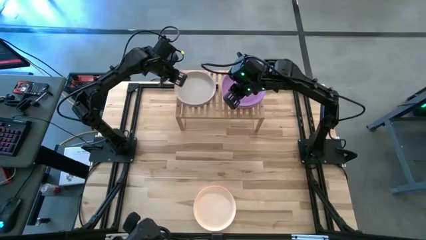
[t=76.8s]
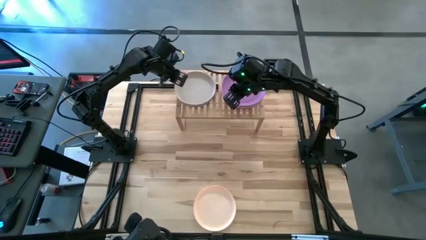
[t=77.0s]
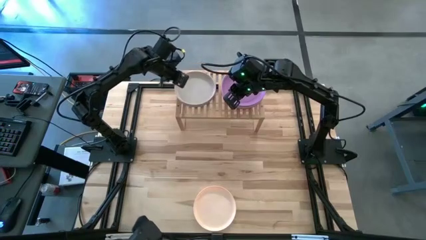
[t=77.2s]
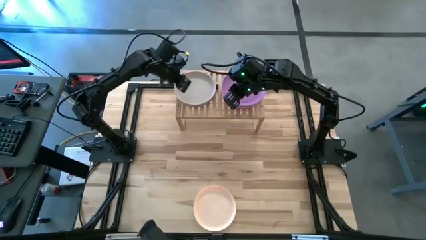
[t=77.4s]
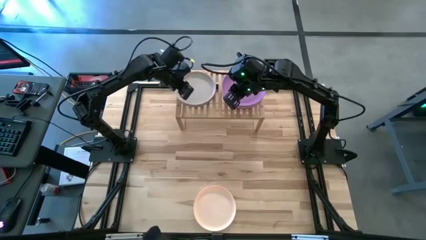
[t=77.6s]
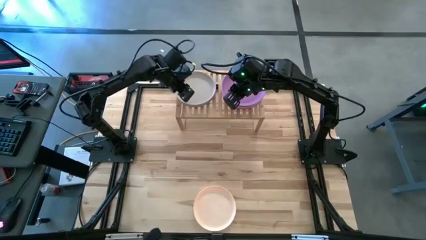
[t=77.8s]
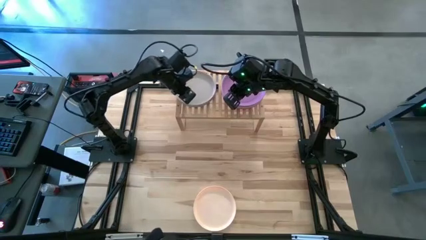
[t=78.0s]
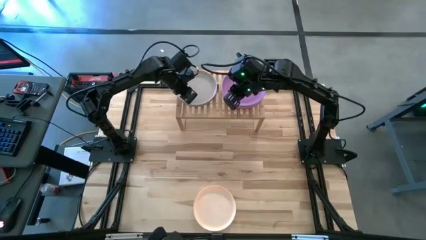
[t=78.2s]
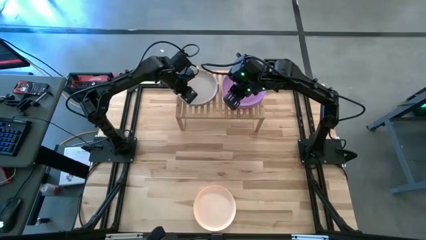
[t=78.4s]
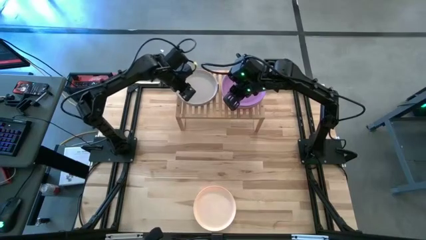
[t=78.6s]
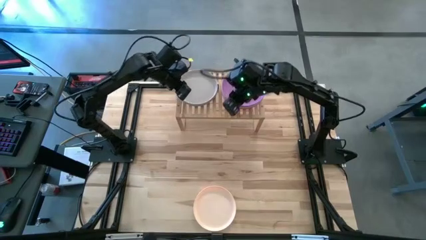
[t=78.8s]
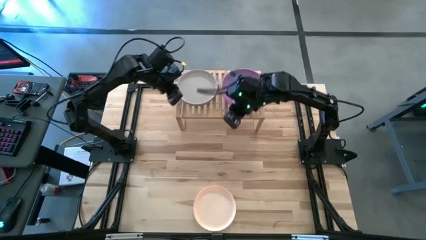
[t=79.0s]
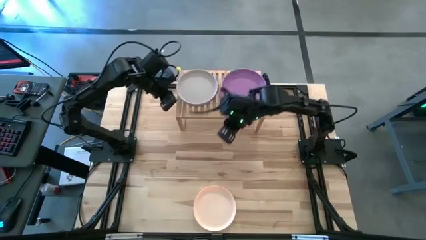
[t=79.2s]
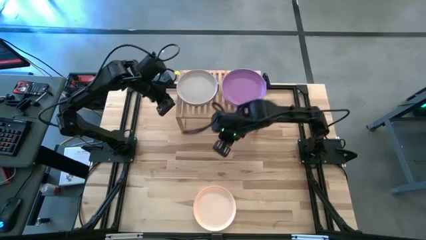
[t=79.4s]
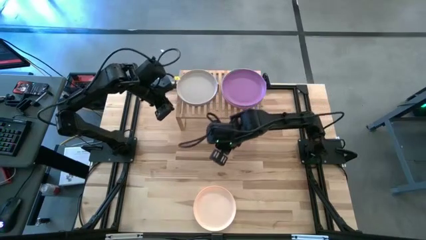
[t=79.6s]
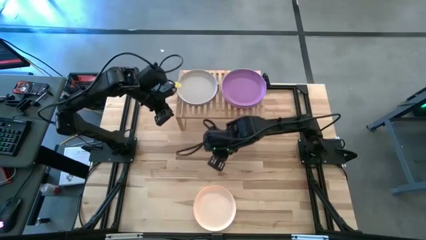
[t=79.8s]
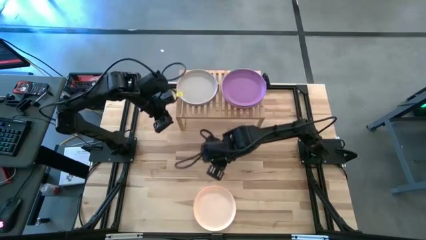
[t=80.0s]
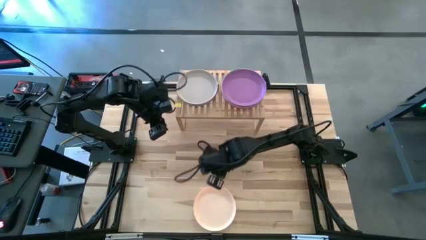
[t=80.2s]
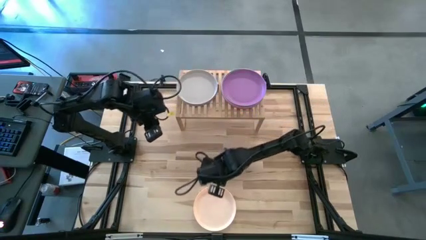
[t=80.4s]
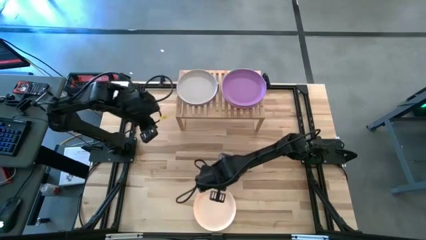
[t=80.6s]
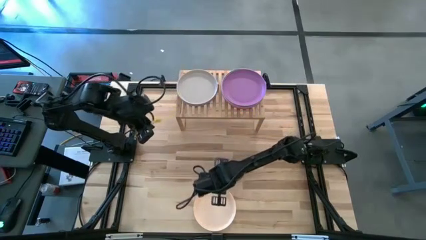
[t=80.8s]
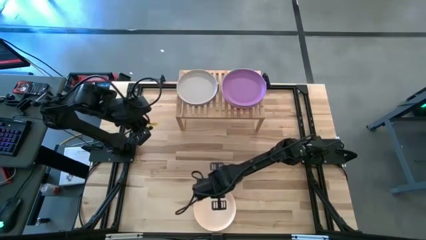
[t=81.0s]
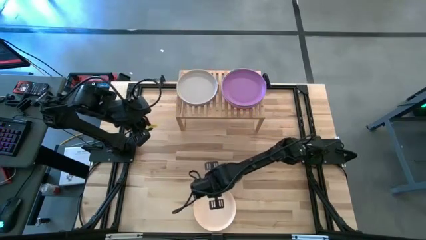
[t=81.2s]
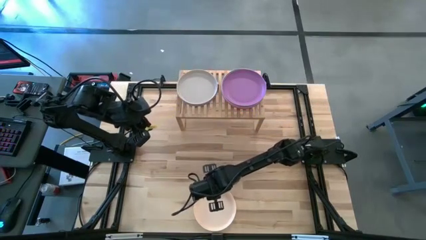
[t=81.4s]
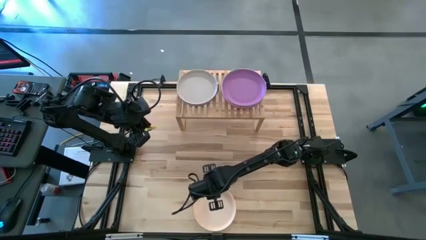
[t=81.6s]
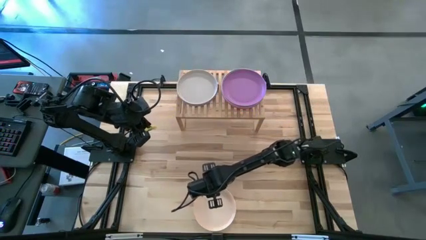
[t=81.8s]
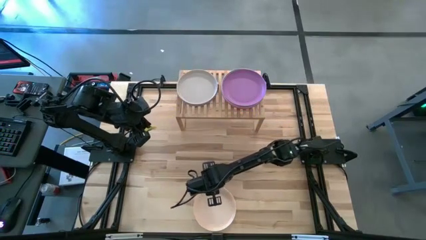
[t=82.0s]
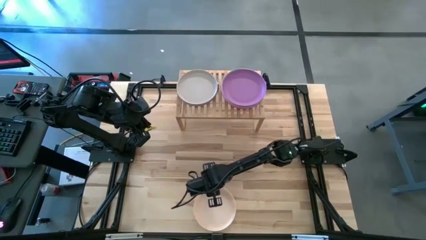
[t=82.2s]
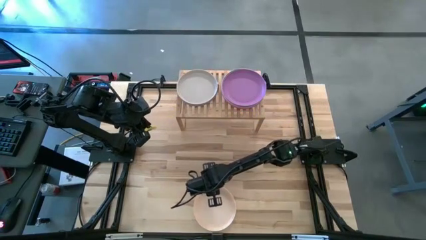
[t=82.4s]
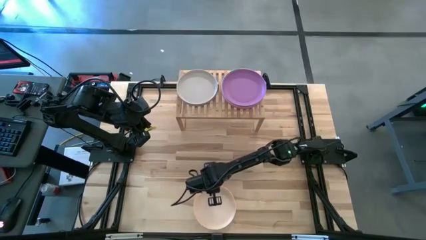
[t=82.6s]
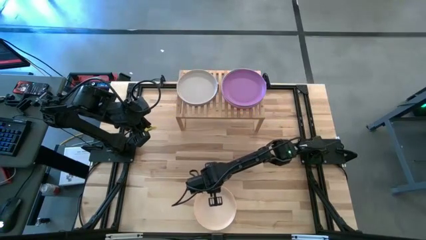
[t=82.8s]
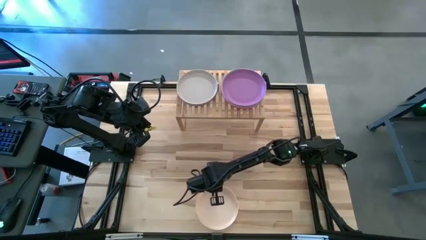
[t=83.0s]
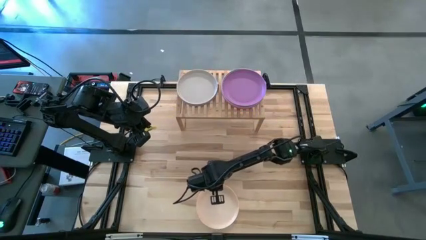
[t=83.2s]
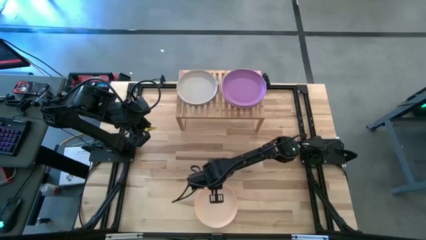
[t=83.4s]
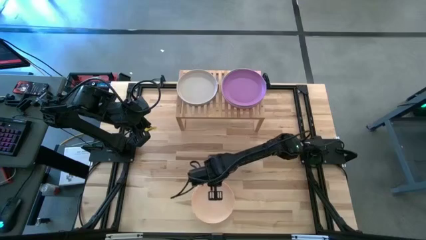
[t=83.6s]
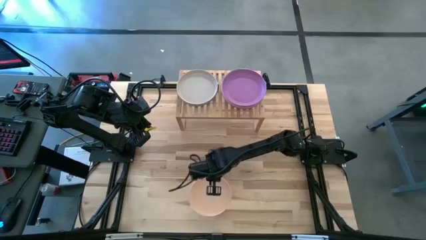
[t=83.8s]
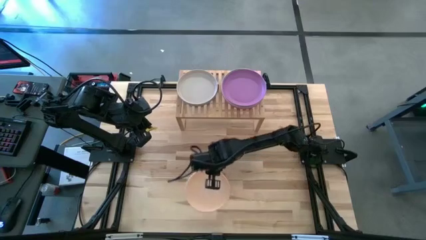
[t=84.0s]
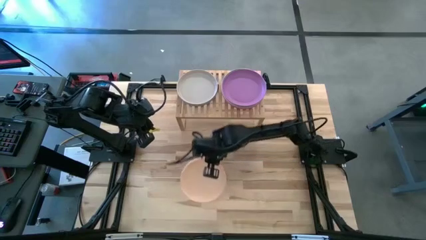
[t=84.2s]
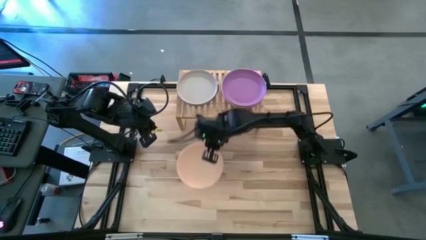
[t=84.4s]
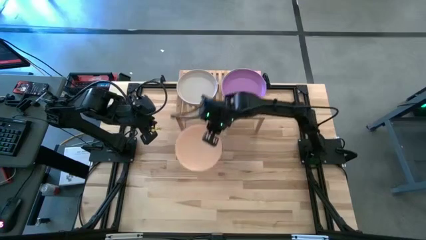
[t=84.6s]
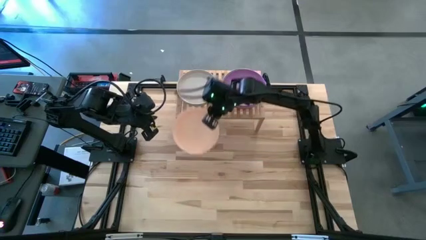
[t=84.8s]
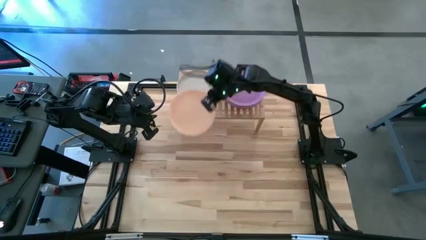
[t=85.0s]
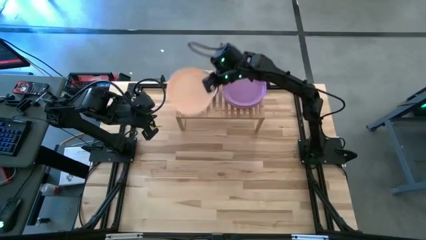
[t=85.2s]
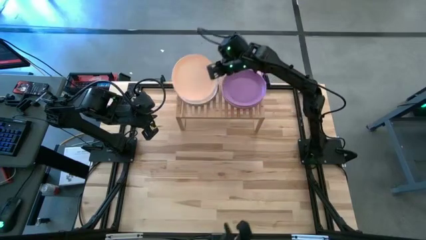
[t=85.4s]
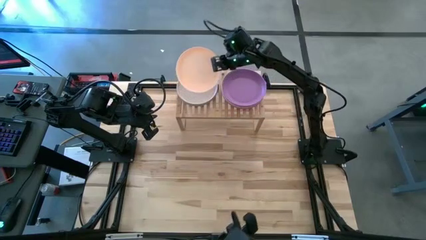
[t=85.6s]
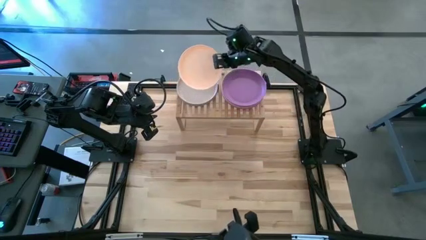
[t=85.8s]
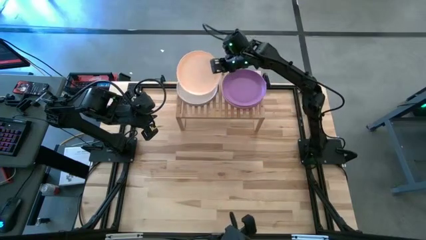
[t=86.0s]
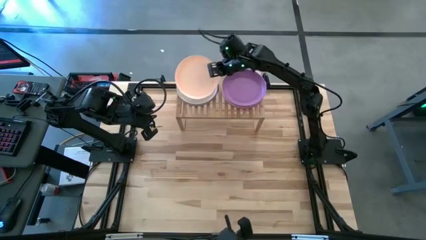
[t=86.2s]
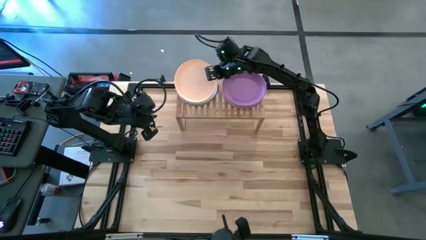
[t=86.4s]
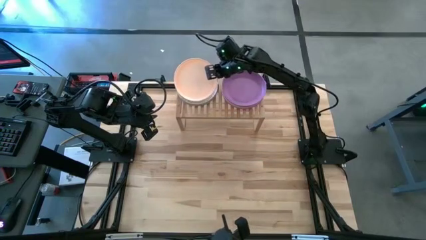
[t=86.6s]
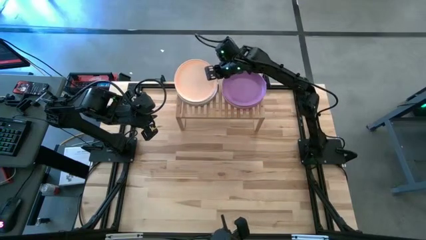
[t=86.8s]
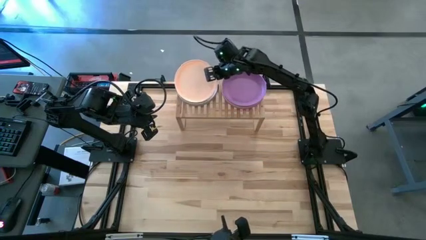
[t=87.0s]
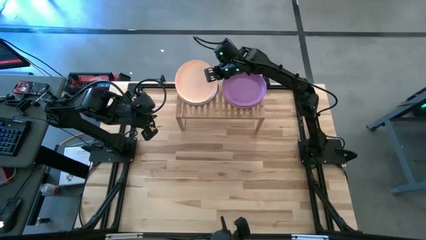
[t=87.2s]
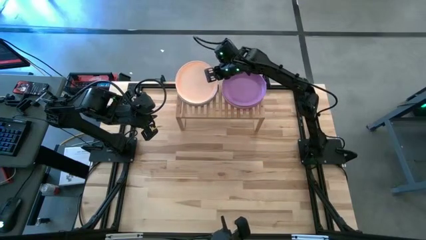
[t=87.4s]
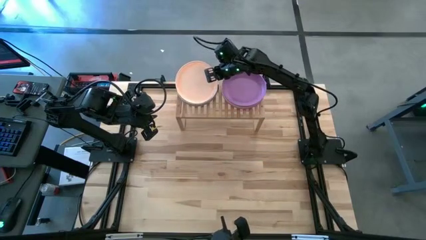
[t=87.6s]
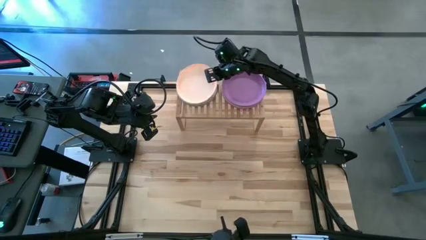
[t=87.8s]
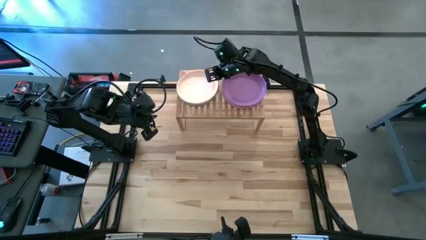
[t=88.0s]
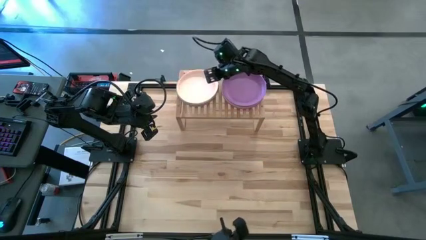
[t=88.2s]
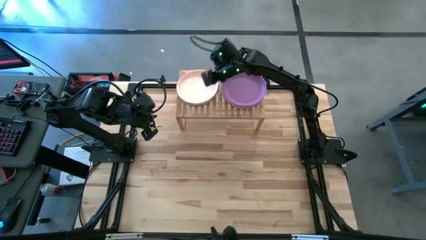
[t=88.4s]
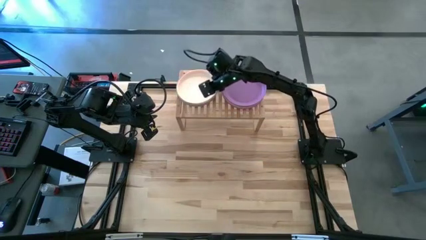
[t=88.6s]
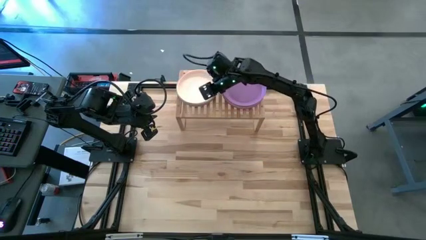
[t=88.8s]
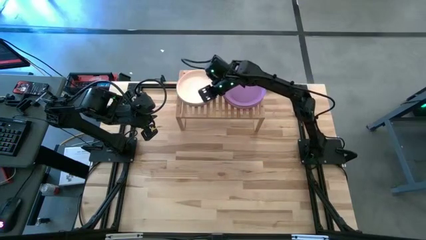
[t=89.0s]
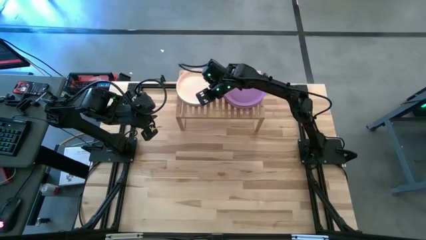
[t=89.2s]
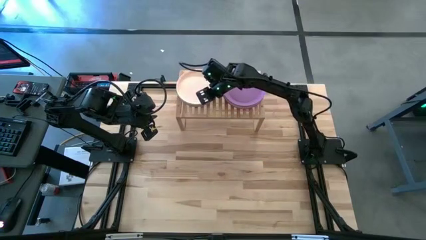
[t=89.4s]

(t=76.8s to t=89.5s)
Task: Place and stack plates onto a shelf
Stack the white plate on top of the gray plate on the shelf

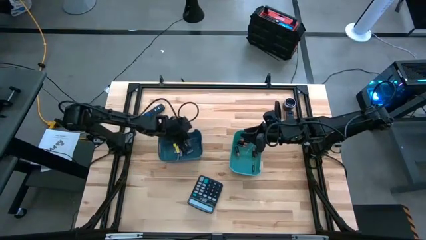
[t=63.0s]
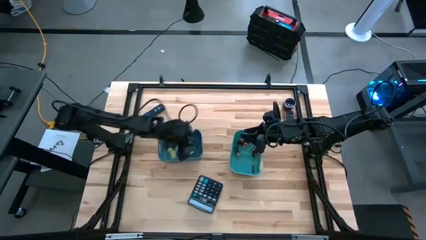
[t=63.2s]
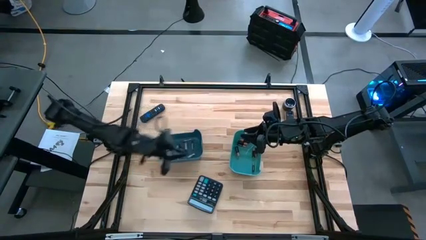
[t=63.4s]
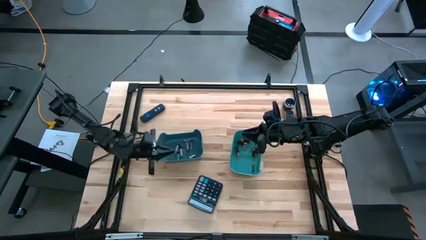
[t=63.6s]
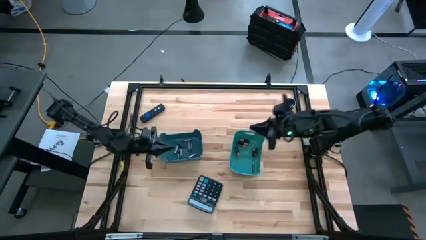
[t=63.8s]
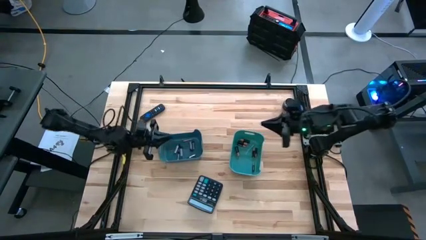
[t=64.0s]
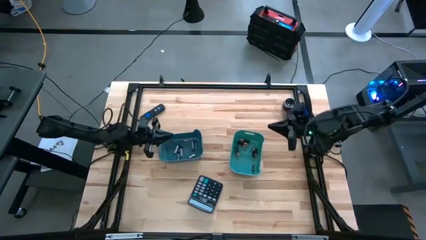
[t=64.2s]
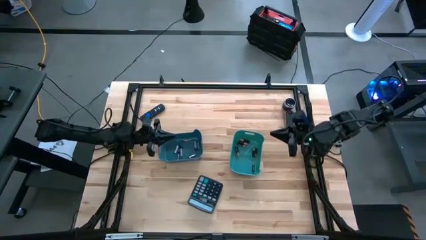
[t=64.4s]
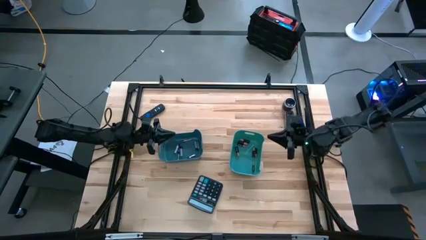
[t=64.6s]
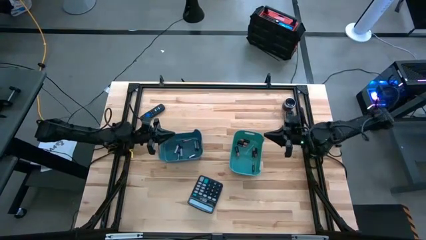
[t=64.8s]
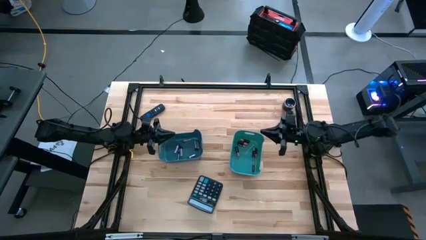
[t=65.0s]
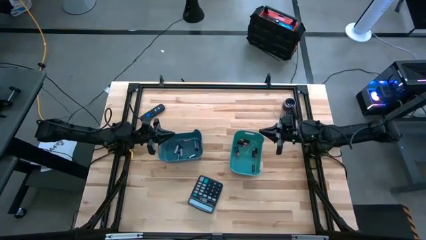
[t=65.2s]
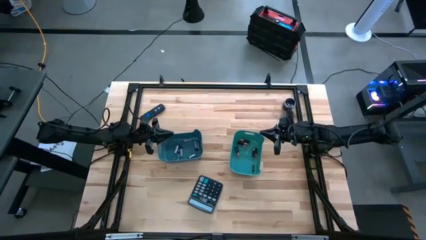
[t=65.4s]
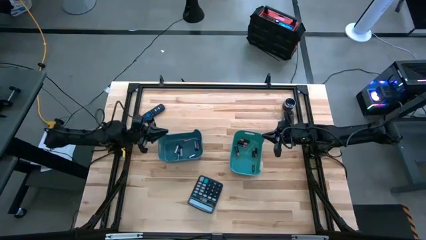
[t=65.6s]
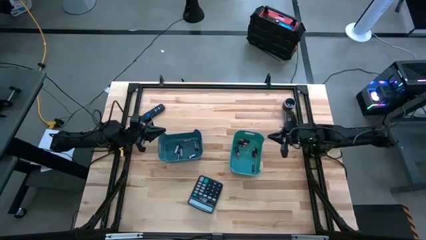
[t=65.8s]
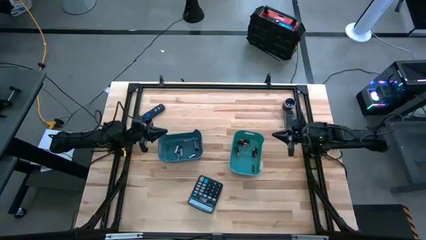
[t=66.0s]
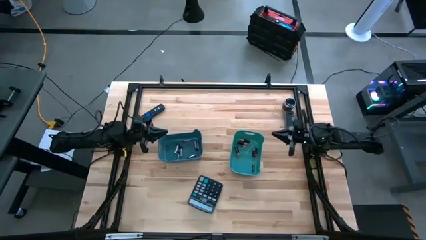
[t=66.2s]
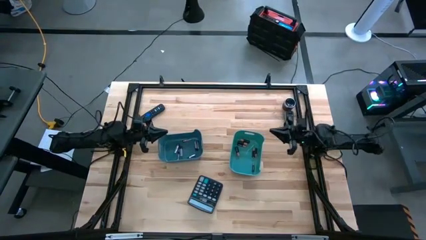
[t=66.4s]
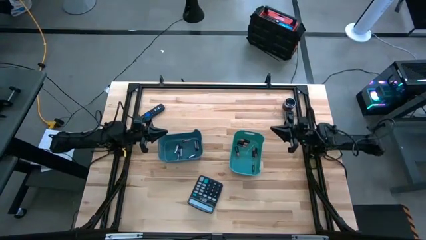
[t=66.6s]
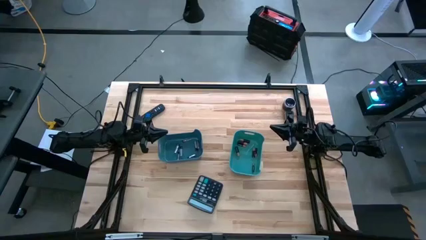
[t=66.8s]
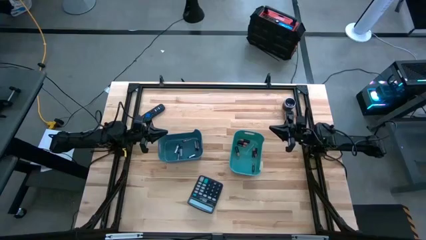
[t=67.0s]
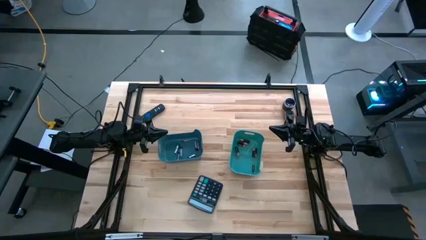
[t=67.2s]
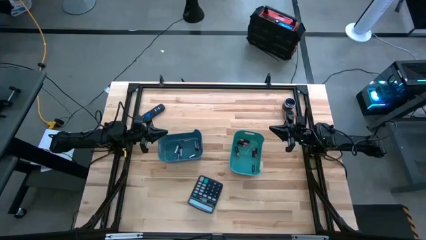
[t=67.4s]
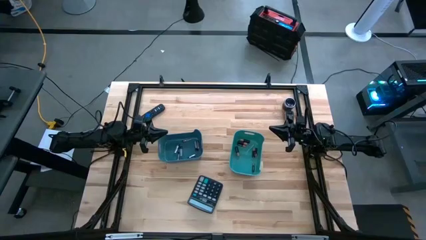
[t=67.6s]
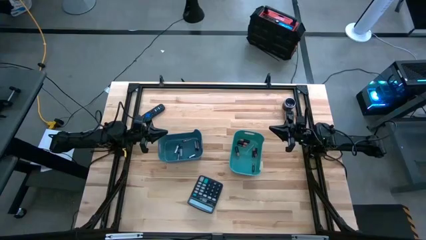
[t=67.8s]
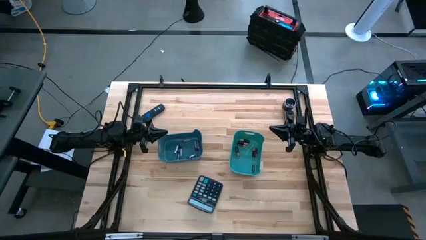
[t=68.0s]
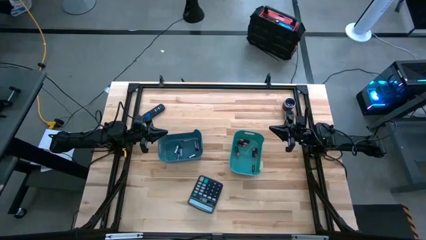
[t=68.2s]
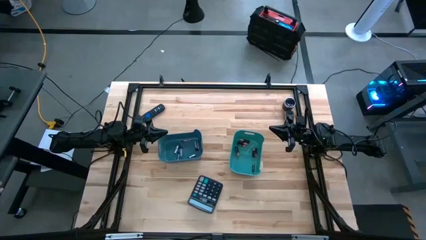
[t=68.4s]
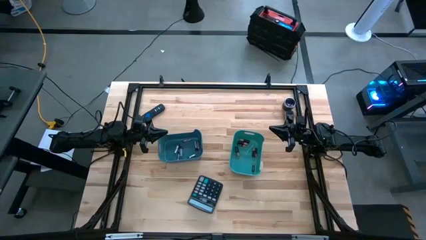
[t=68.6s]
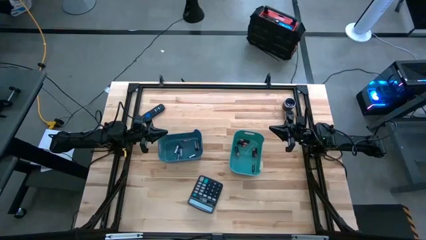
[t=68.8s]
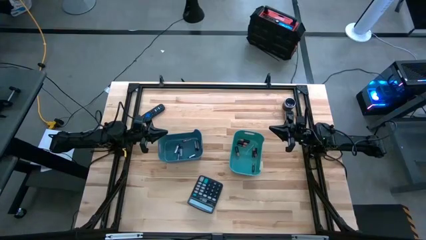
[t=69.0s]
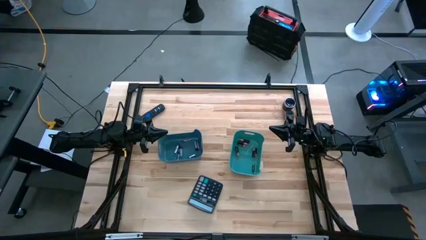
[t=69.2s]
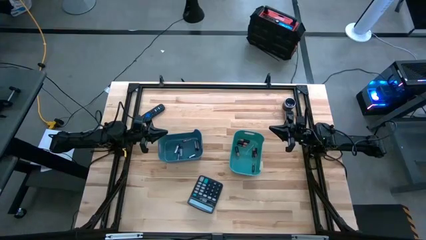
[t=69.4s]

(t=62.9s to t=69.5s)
Task: Sort batteries
Return to Home Position
